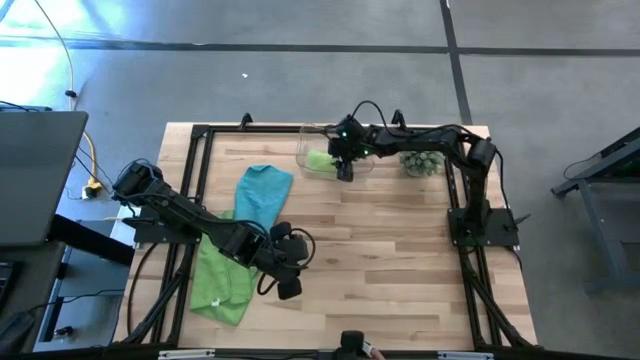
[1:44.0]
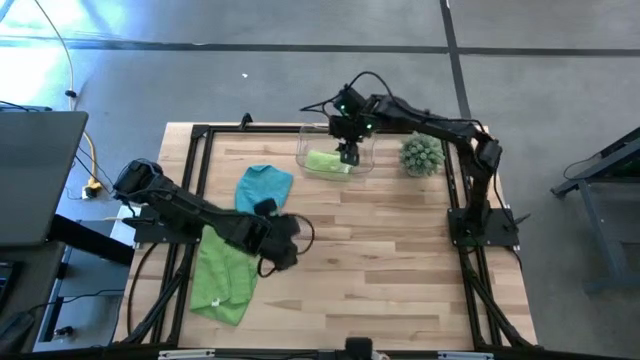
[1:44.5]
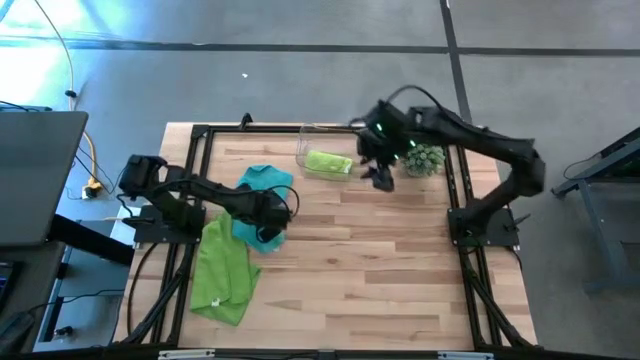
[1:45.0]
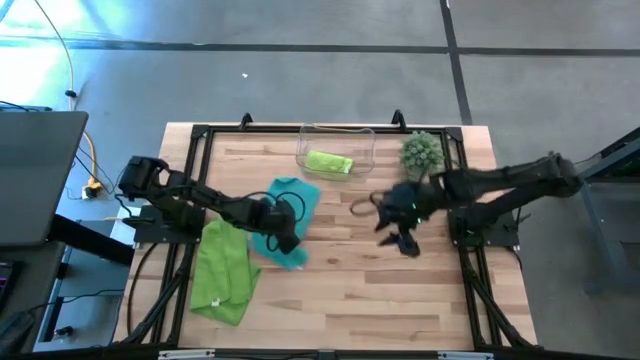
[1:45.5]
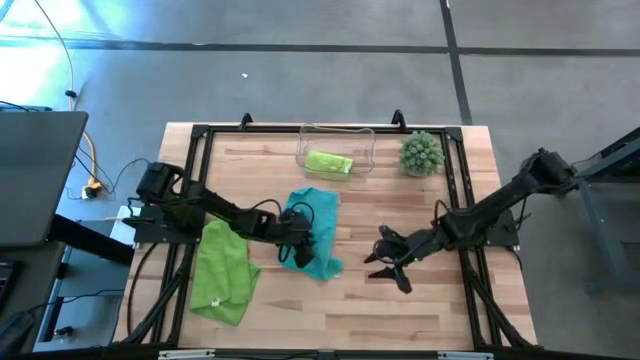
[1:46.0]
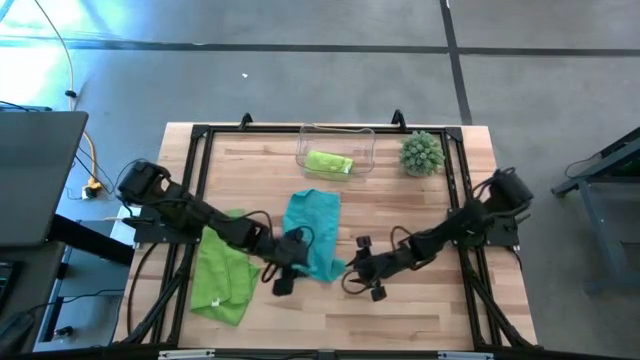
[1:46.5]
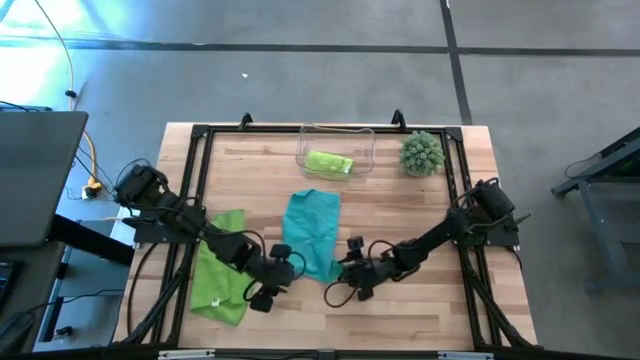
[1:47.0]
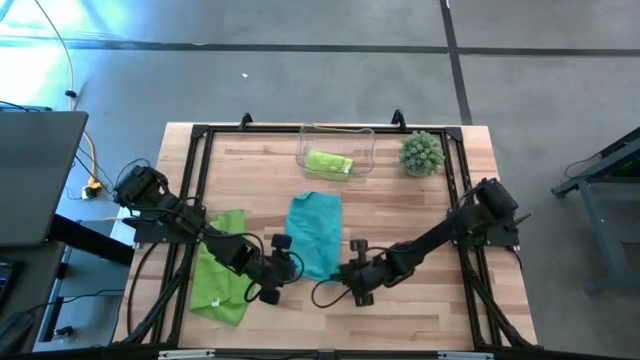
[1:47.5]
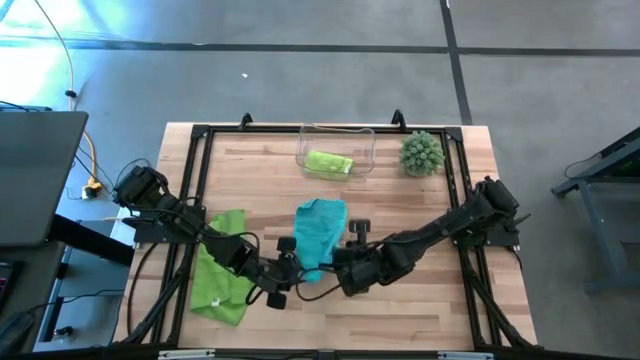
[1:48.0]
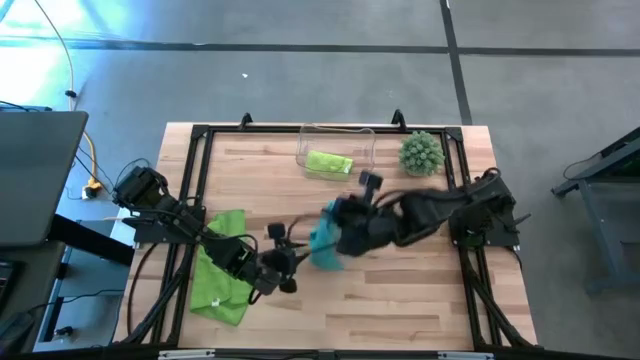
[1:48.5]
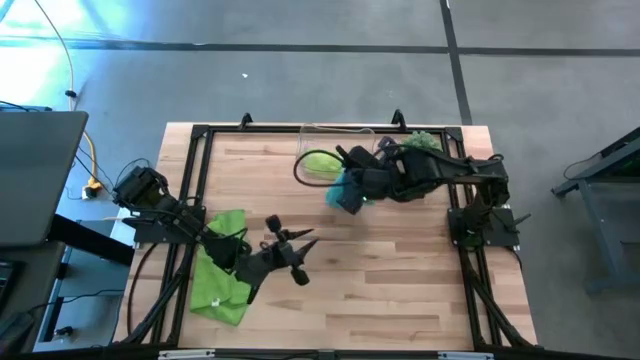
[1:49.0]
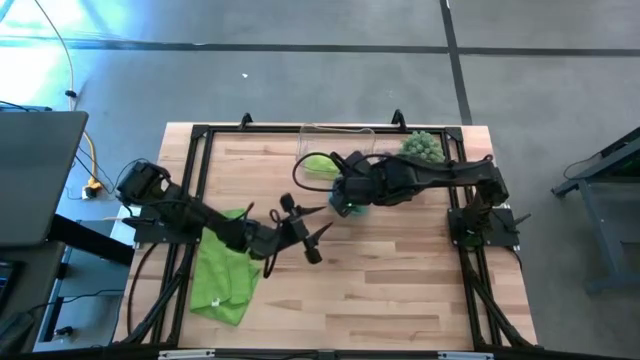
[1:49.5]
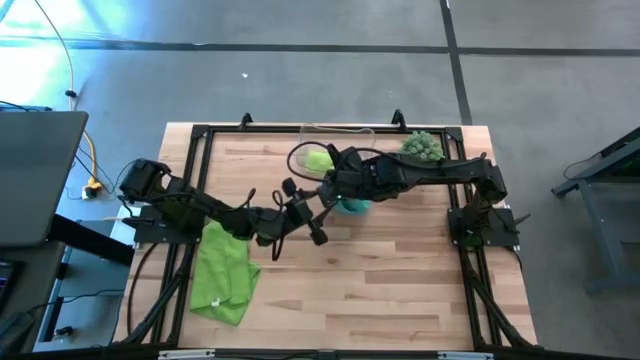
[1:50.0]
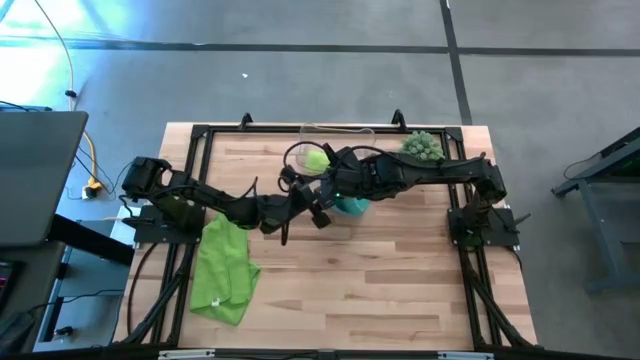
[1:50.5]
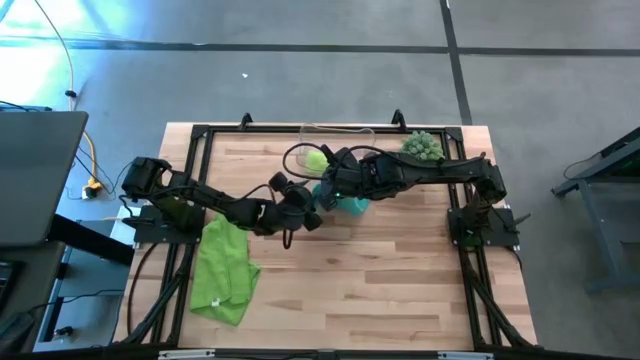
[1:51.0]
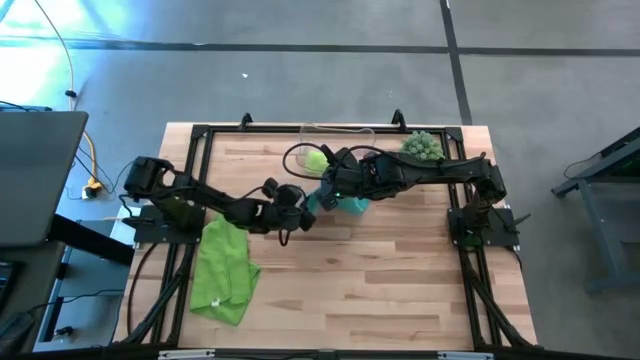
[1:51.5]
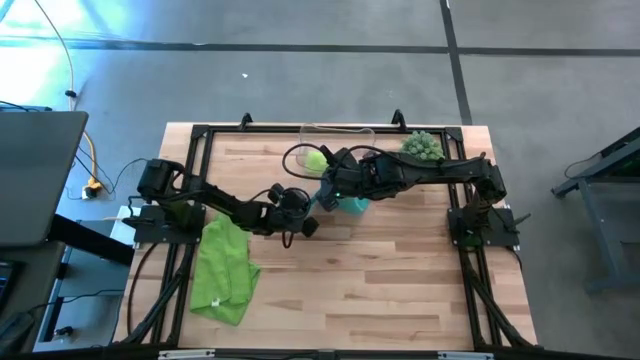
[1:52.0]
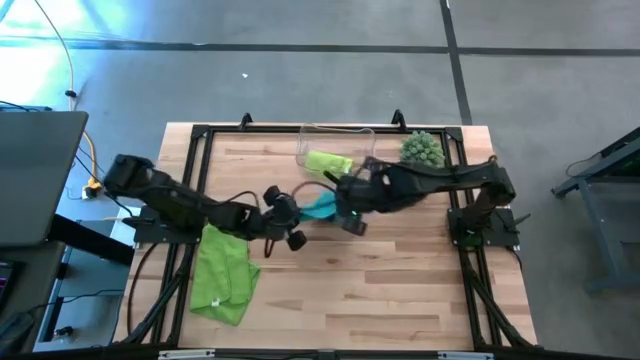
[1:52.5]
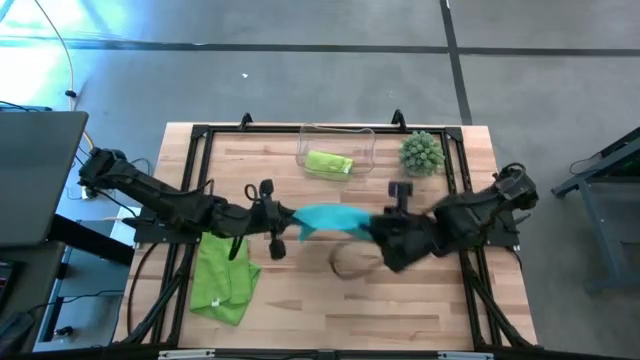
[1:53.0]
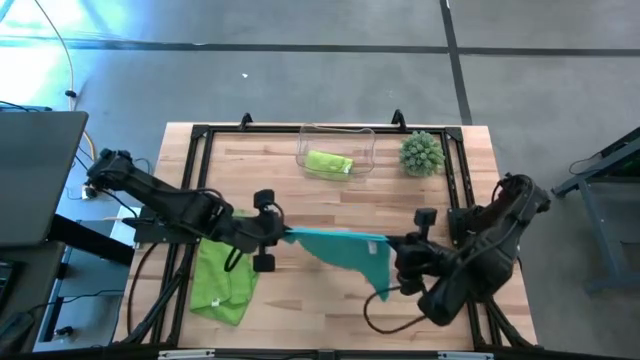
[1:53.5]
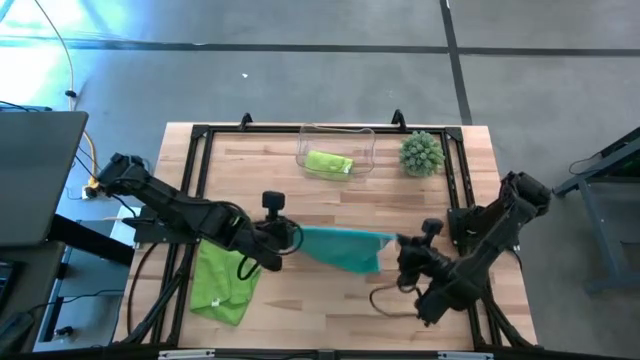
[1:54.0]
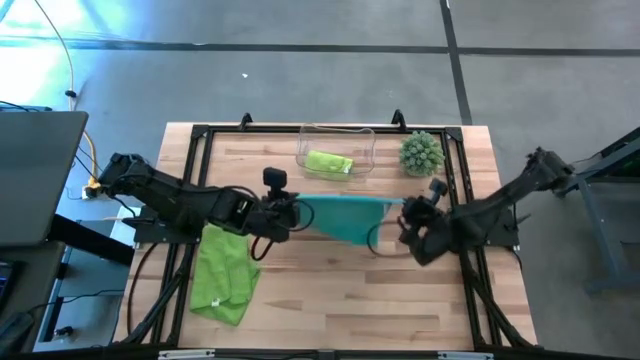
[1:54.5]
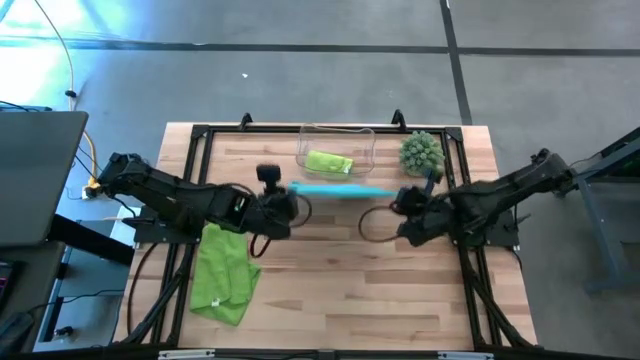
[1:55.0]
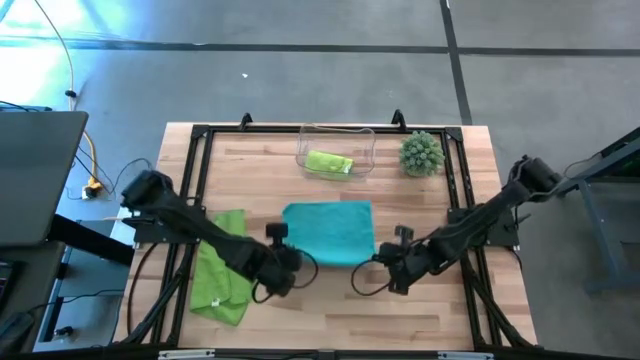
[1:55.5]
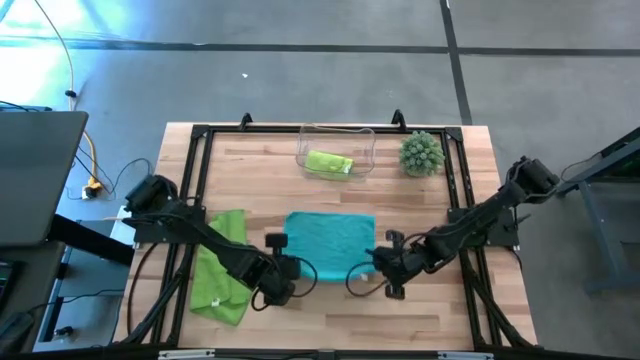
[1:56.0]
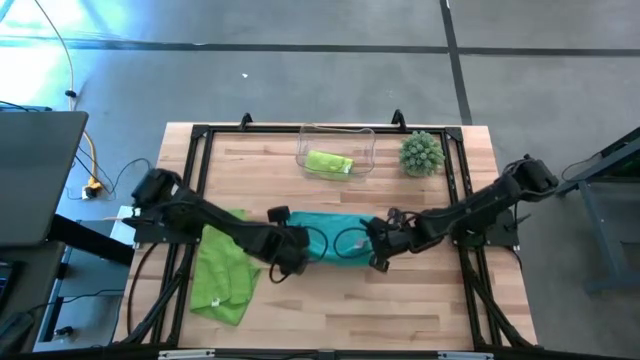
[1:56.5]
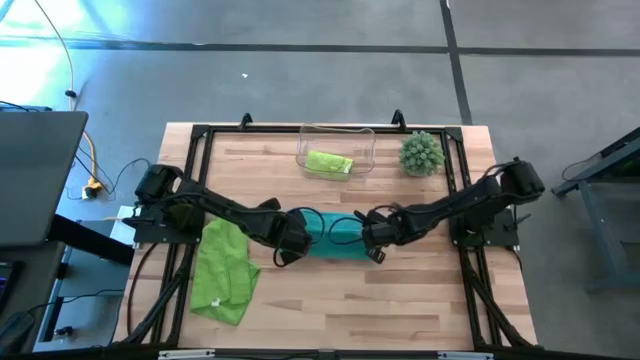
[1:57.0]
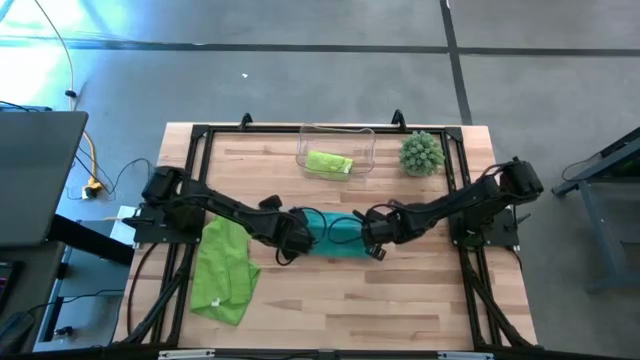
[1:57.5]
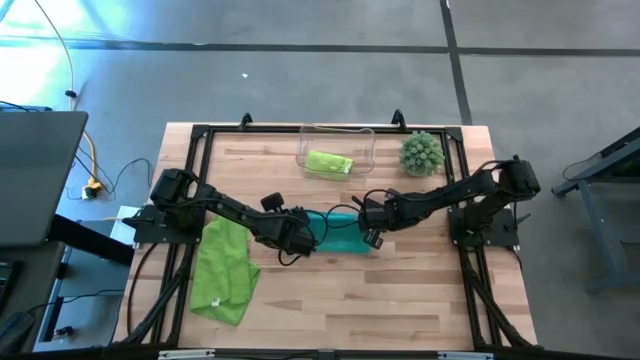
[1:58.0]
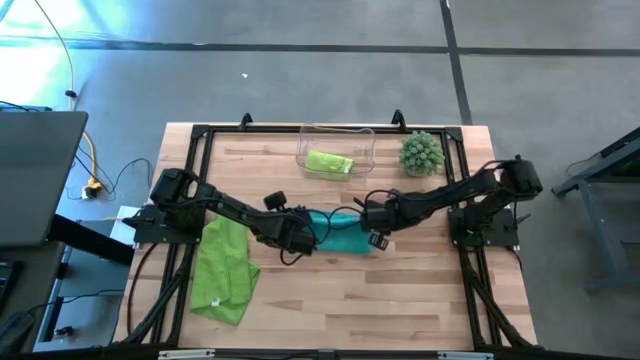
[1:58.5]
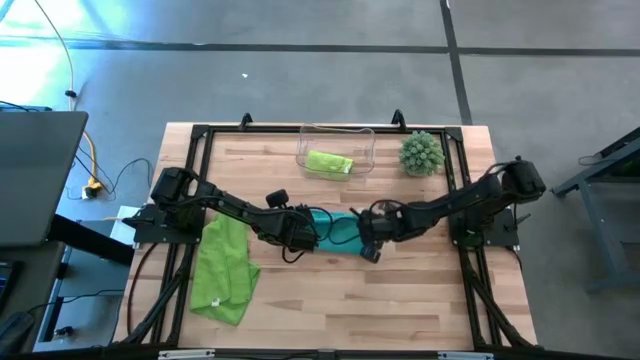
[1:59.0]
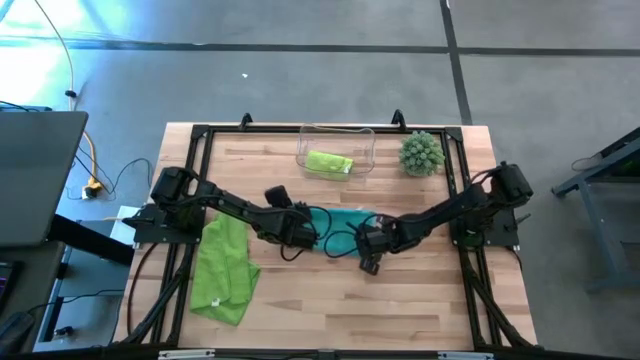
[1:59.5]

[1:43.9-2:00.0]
Task: Roll microfiber towels into tight, uniform cylinder then place into a basket
Fold the blue microfiber cloth

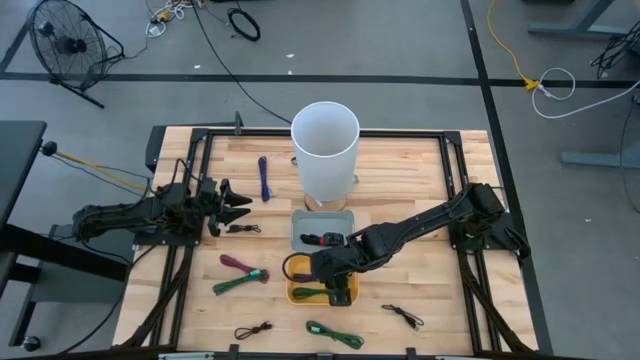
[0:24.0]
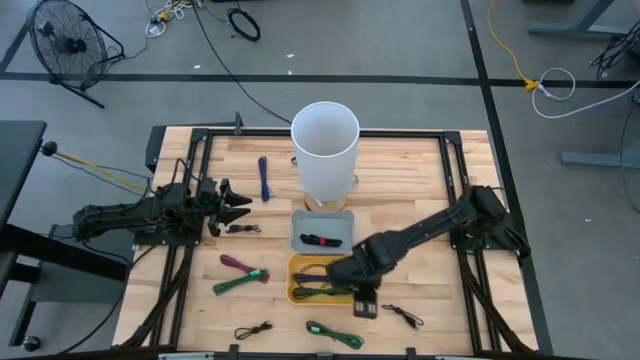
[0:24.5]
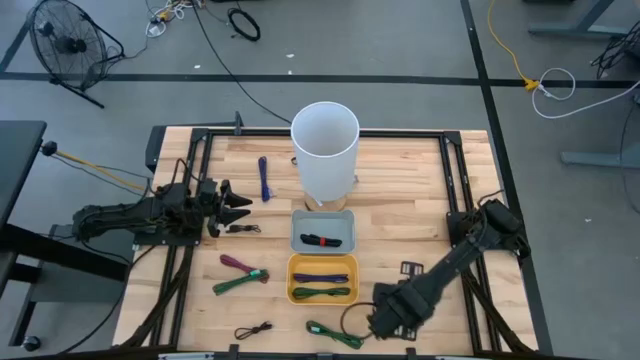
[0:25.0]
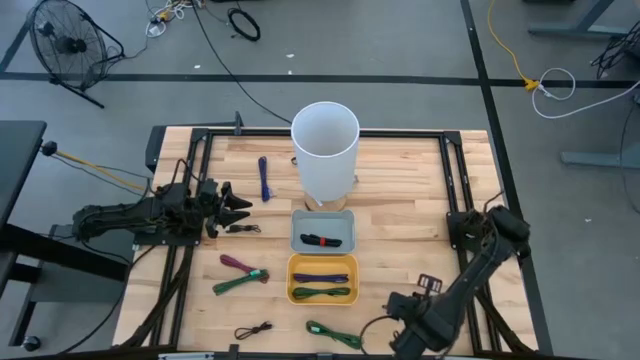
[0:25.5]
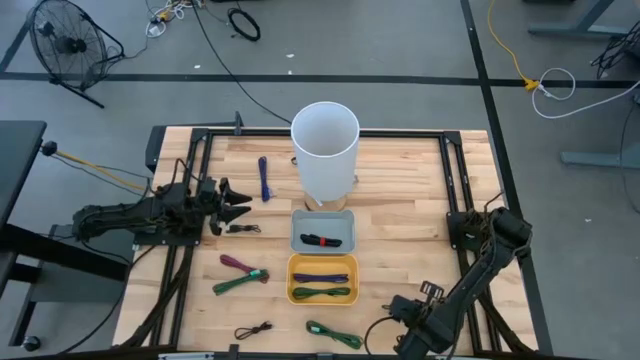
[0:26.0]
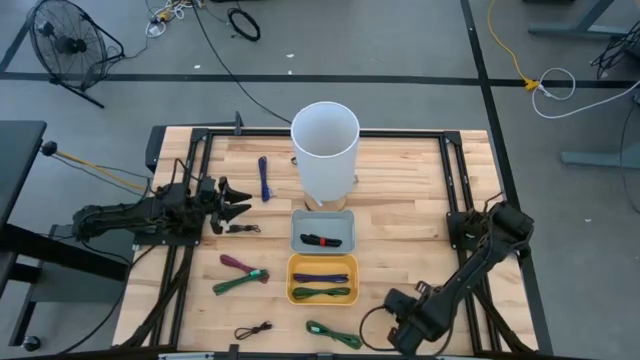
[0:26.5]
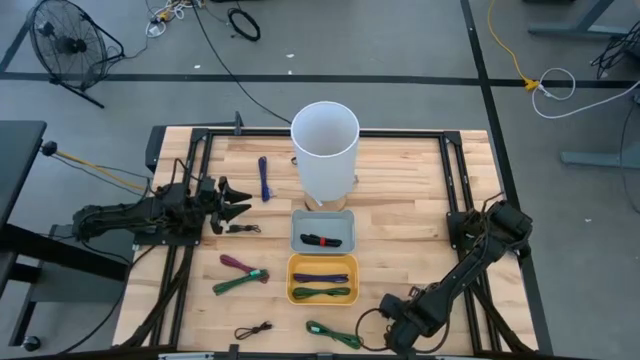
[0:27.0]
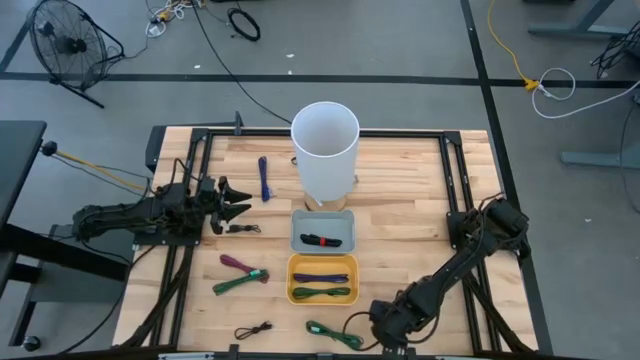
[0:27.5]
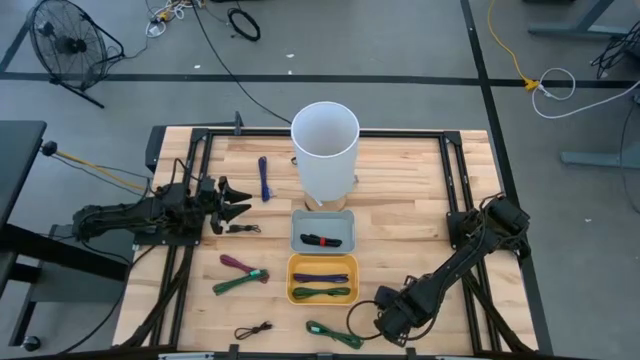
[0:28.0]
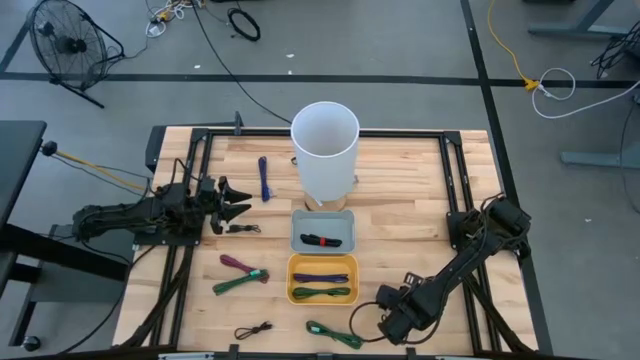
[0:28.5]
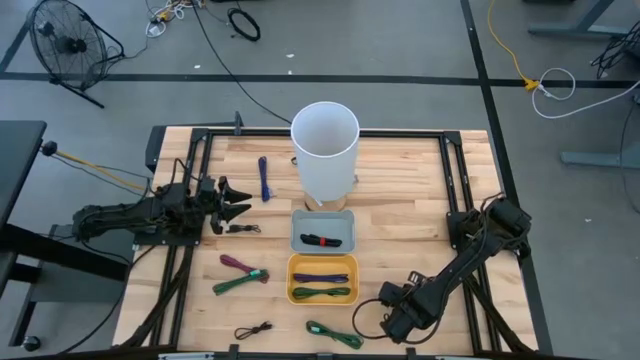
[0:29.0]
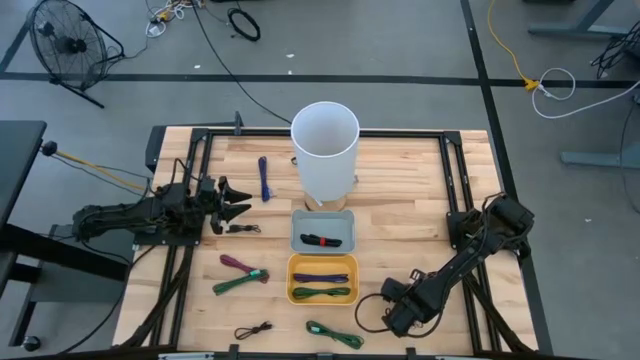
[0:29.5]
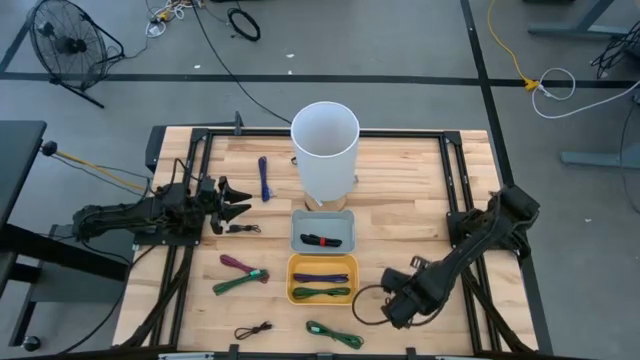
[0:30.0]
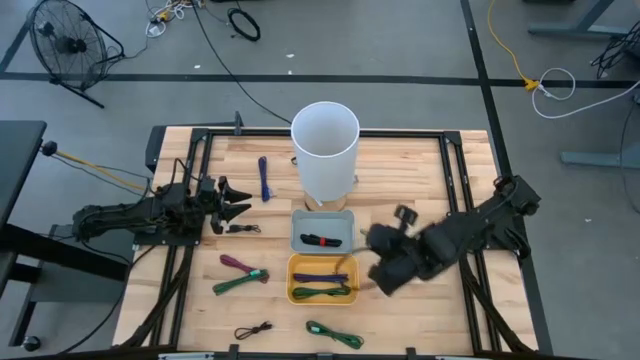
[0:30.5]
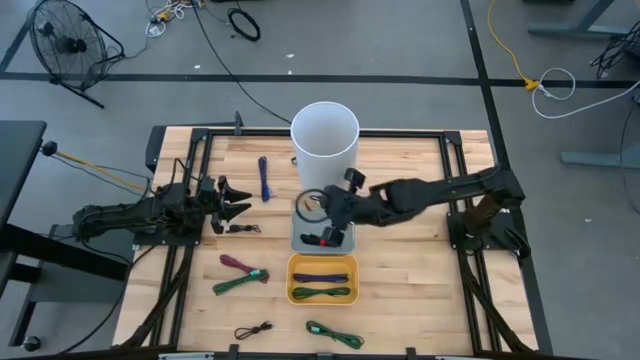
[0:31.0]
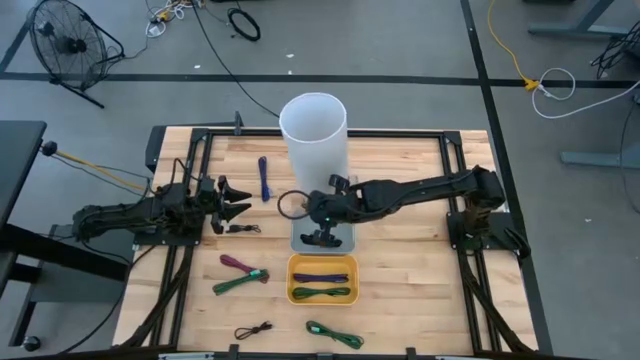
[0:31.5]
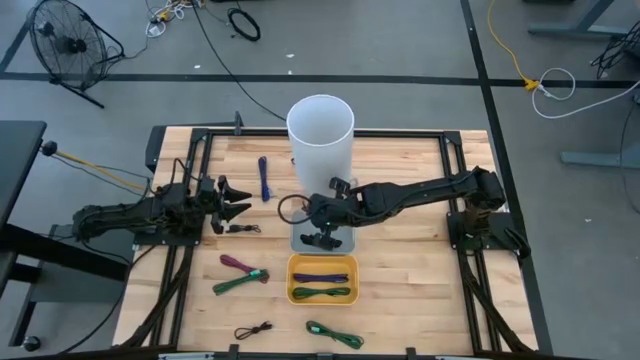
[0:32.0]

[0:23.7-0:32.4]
Task: Pick & Place USB Port
Put the black charger cable into the gray bin
